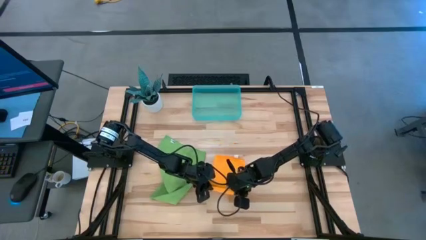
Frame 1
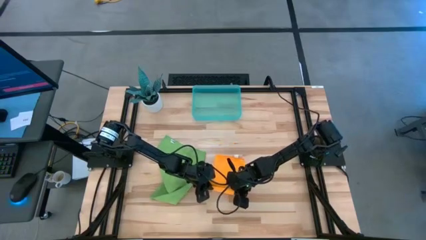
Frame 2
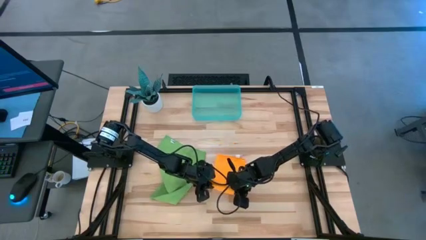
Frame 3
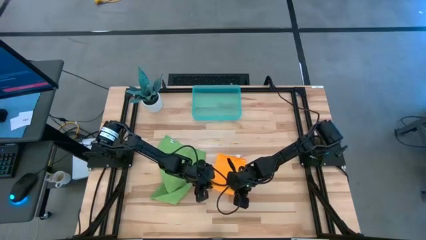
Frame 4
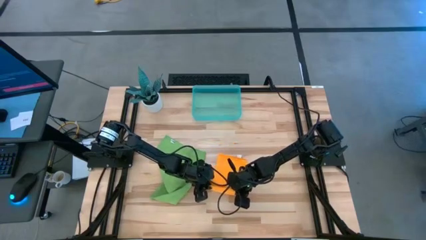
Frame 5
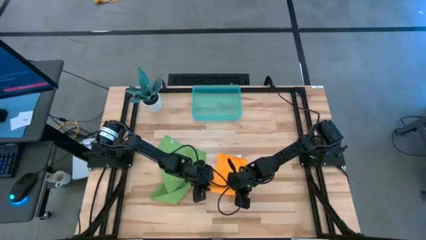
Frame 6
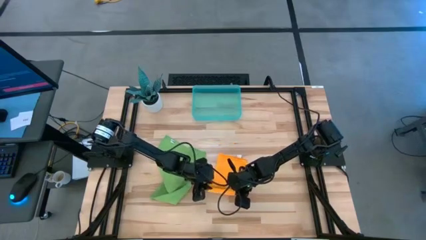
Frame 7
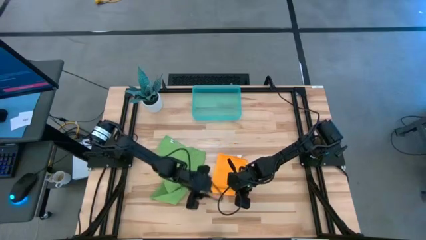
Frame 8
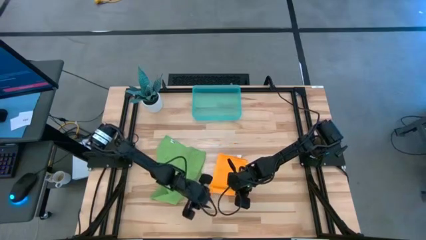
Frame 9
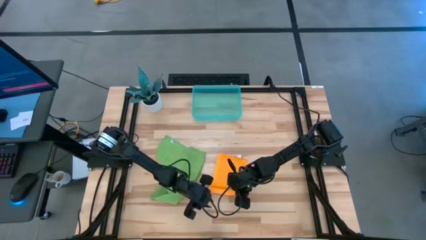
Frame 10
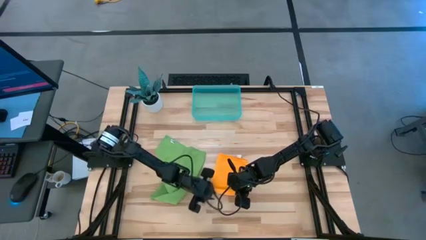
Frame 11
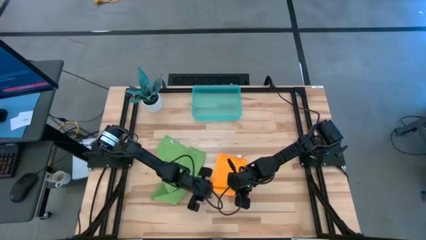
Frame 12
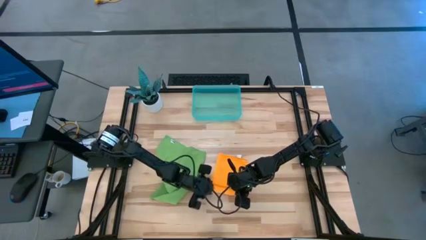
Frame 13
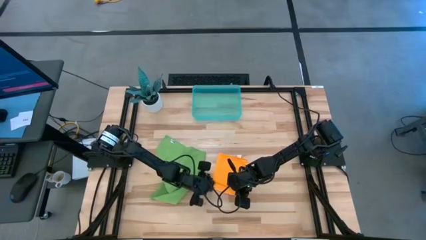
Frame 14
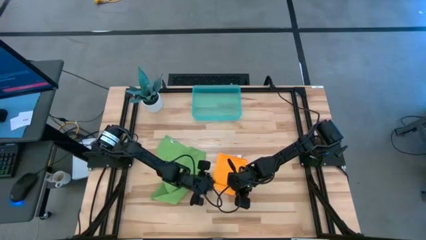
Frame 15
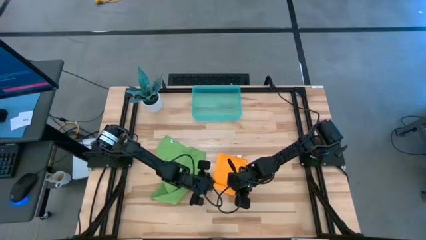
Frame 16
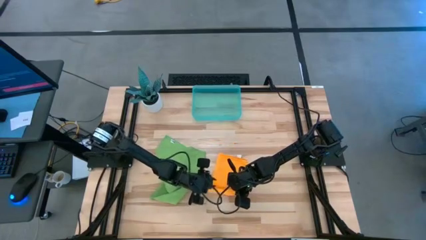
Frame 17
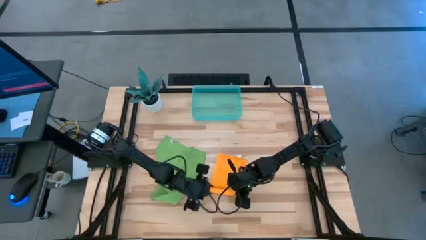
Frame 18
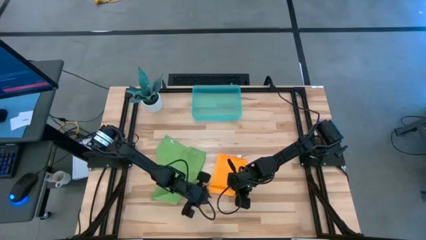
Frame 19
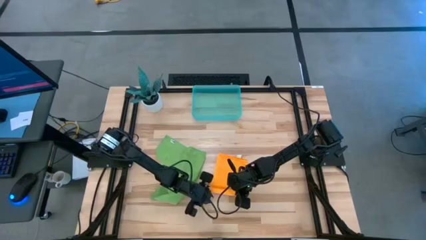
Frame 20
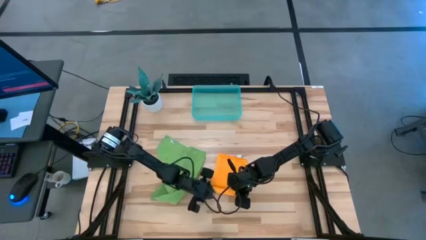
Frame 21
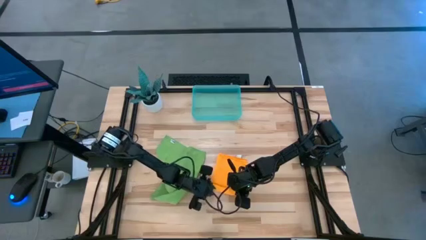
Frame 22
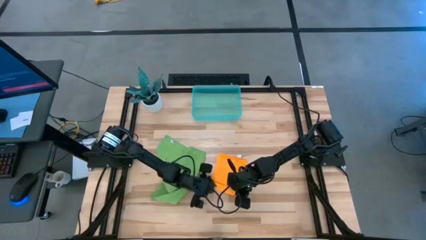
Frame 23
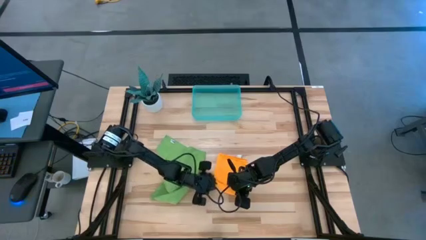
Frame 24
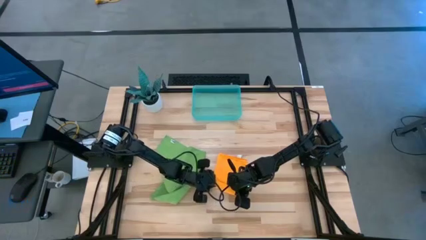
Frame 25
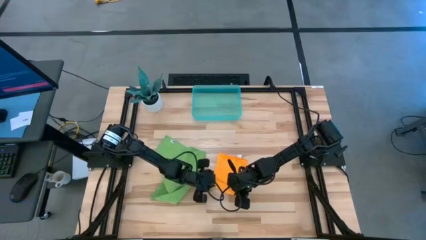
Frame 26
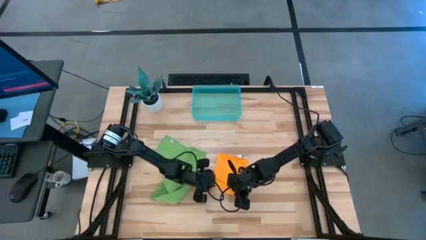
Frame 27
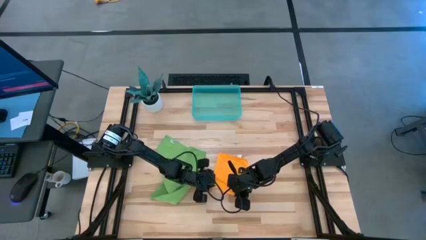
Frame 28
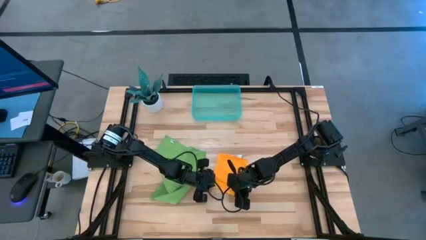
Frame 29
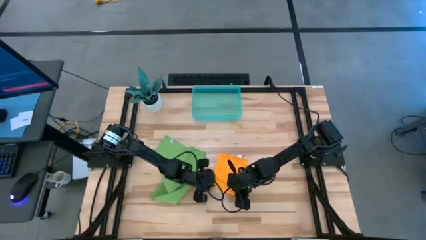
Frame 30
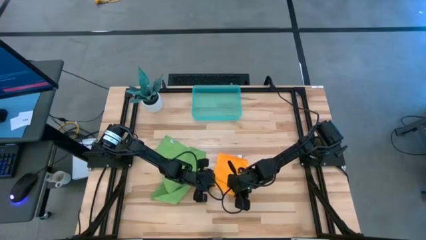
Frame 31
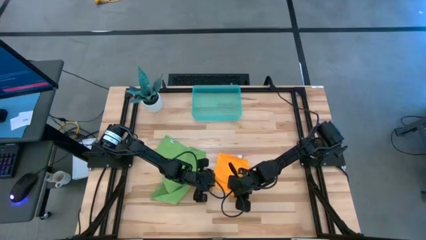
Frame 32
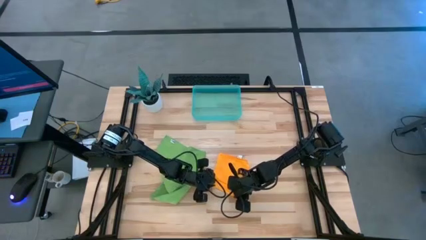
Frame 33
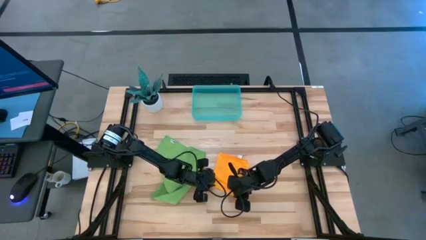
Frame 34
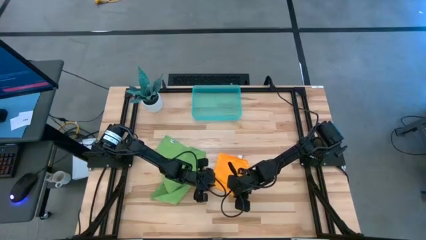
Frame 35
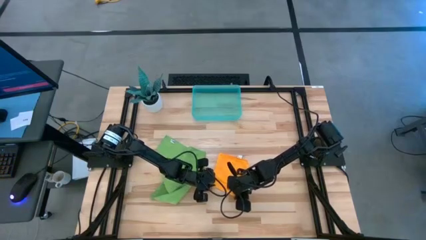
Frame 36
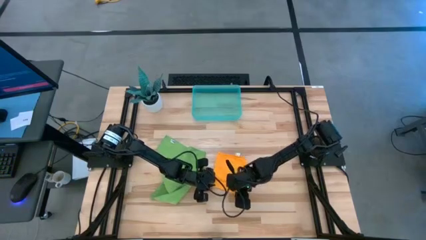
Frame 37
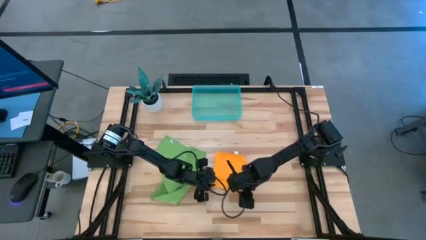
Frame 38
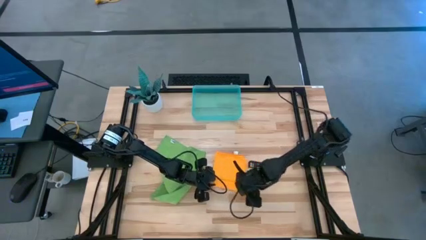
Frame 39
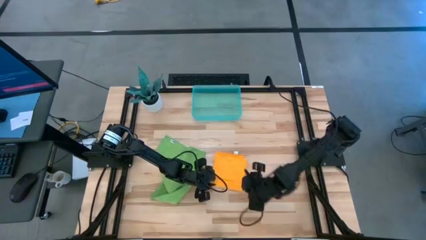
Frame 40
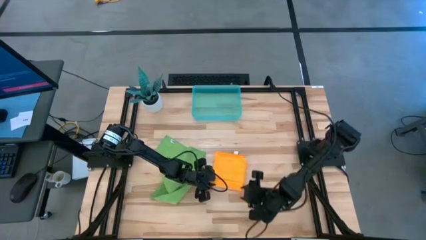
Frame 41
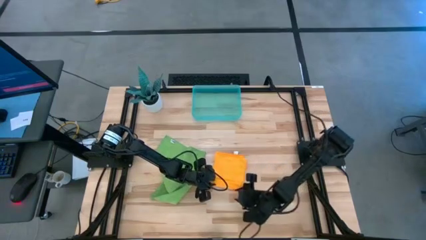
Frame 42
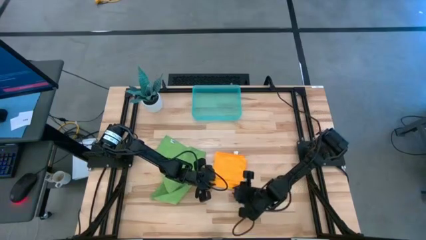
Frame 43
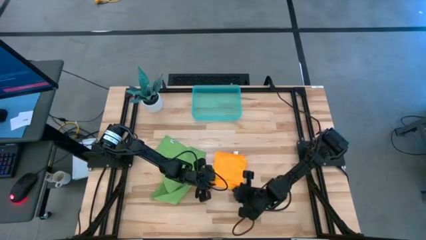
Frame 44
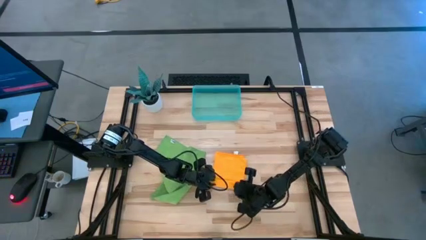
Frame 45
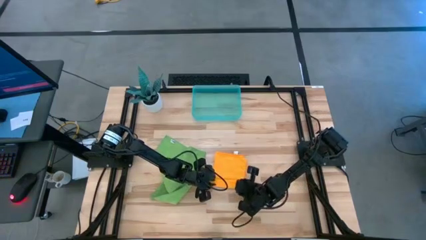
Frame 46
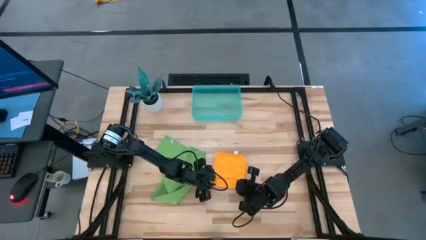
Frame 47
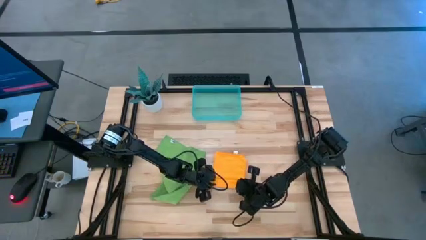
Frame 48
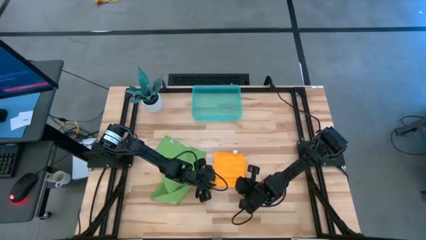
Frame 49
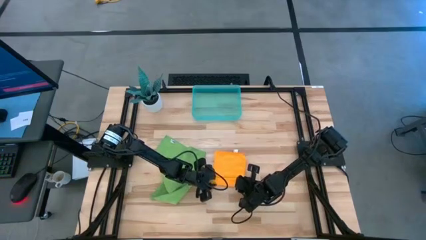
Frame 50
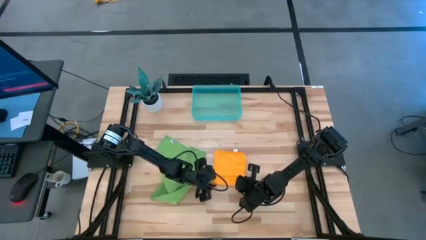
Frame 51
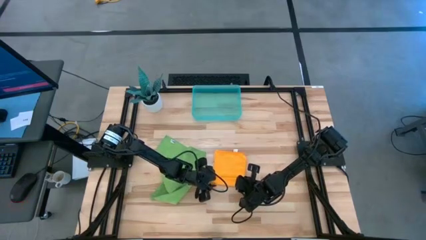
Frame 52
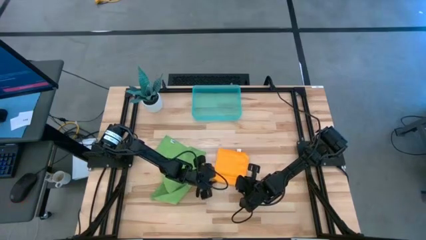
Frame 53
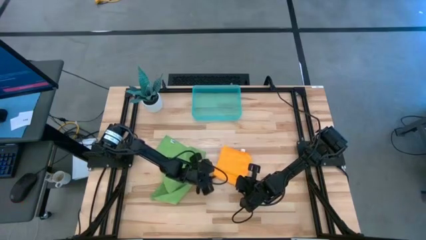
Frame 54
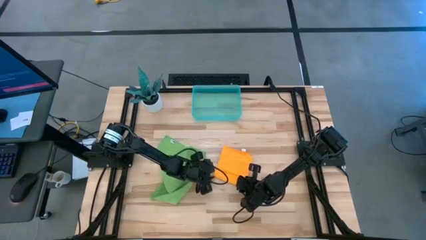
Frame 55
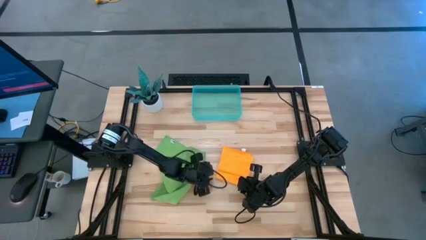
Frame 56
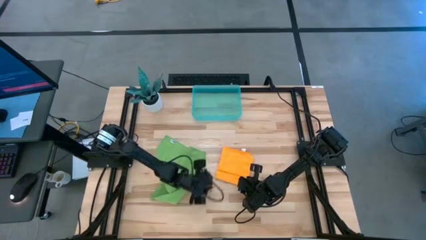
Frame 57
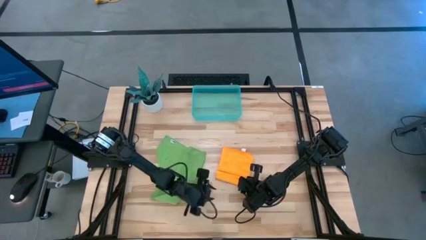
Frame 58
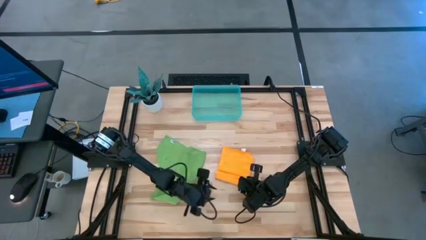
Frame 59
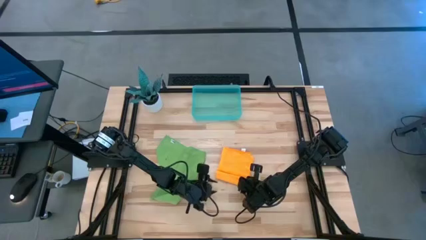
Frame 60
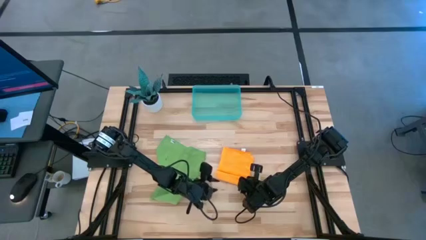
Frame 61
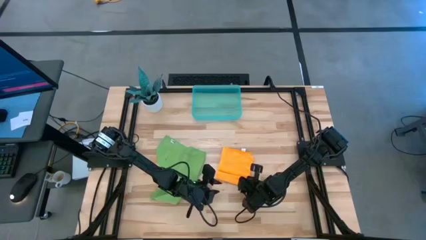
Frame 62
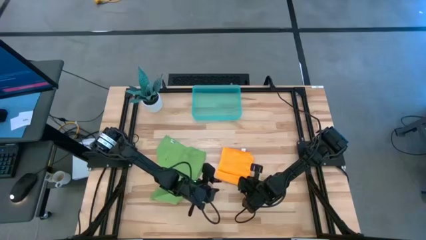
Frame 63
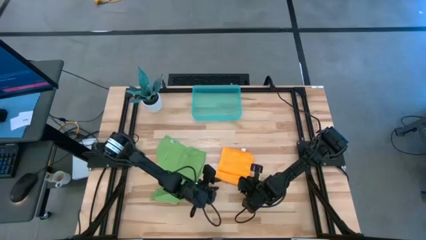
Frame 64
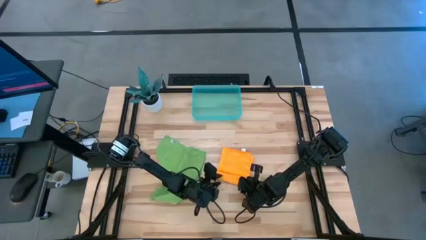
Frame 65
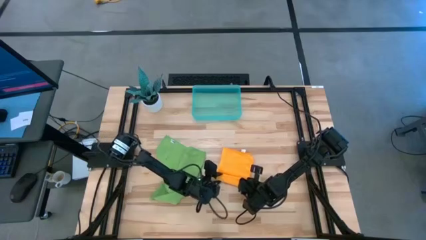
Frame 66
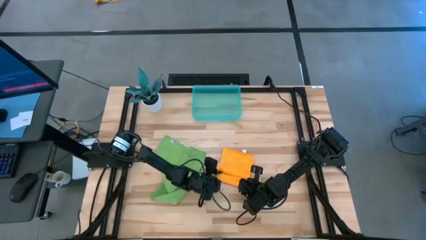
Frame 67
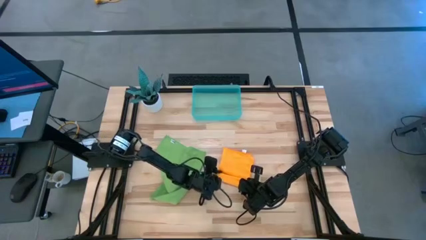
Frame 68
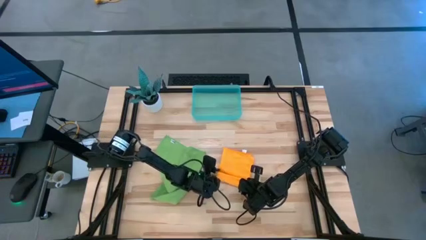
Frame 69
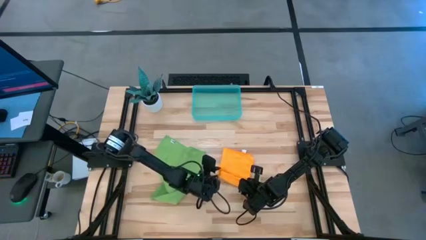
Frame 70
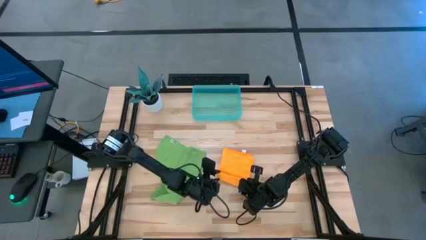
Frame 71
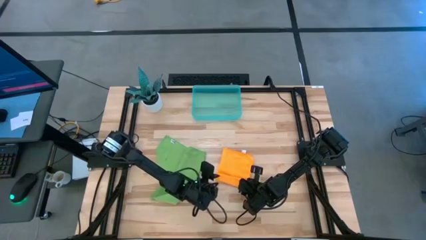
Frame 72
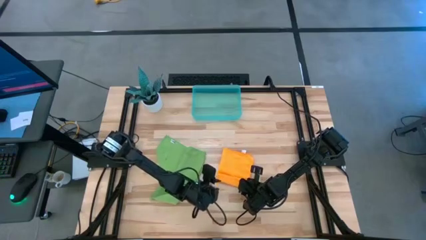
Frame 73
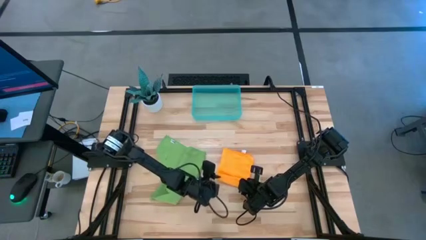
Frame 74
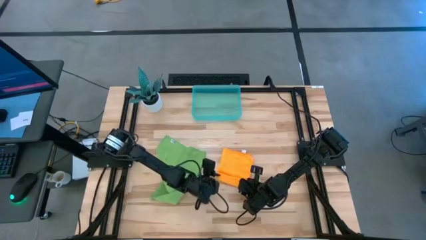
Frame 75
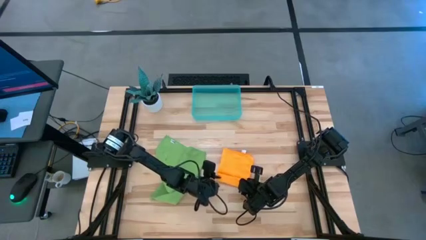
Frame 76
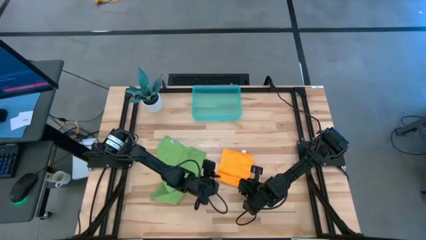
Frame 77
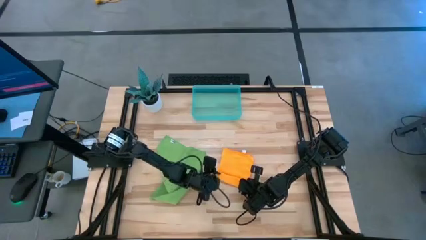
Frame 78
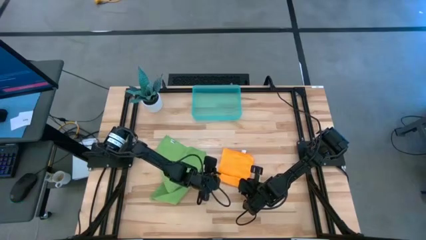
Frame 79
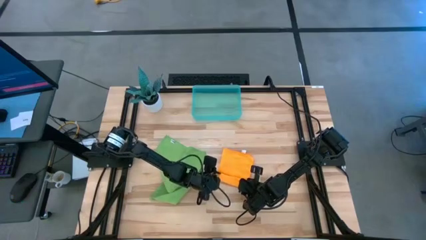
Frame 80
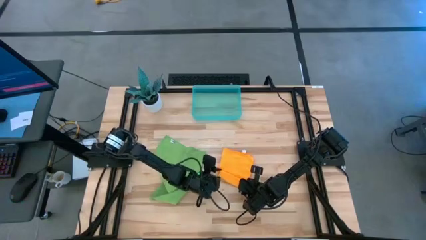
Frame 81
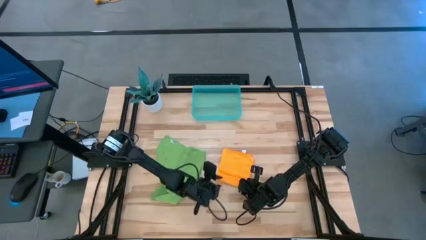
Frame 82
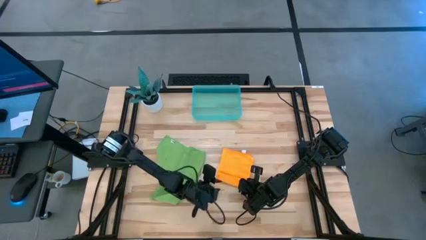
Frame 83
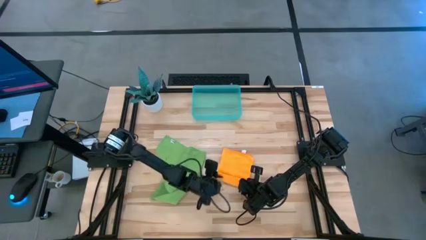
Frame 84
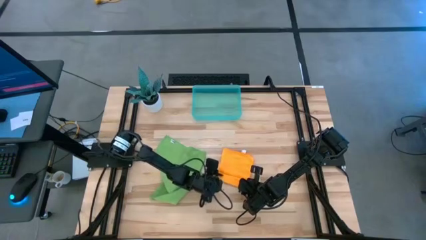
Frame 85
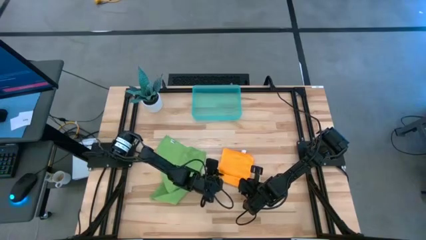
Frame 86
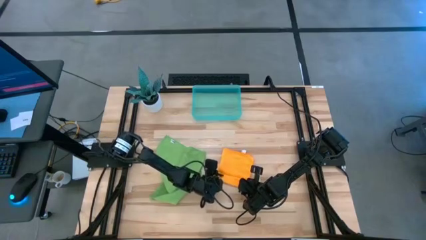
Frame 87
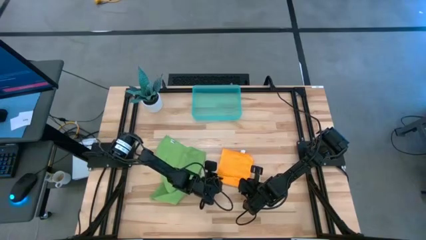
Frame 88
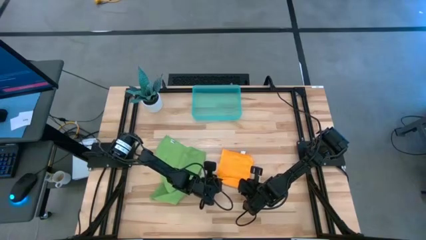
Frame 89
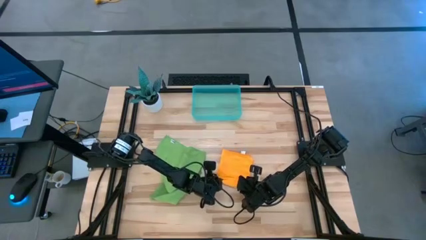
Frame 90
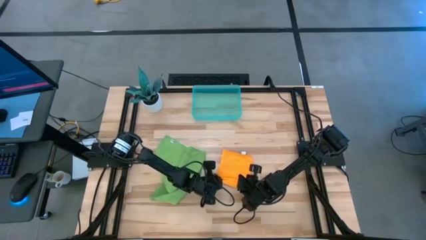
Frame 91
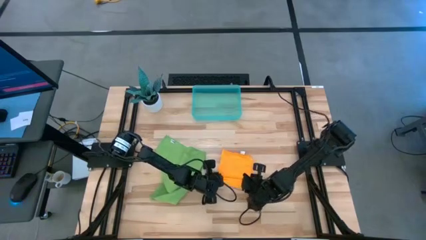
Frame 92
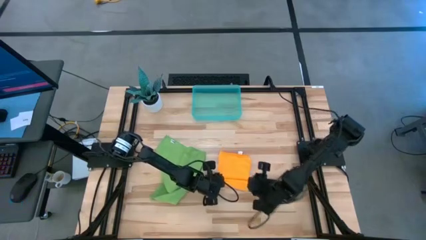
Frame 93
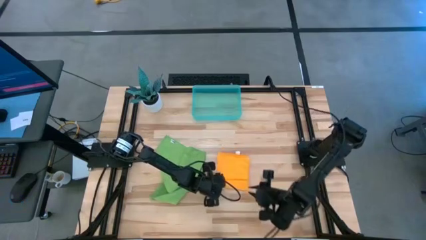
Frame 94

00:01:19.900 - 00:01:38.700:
Task: Roll microfiber towels into tight, uniform cylinder then place into a basket
Roll the orange microfiber cloth
